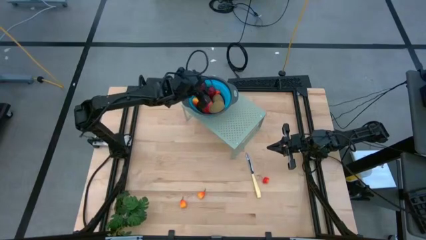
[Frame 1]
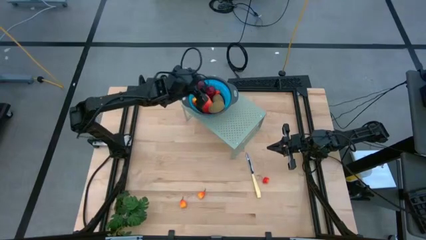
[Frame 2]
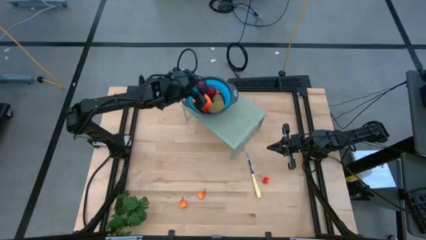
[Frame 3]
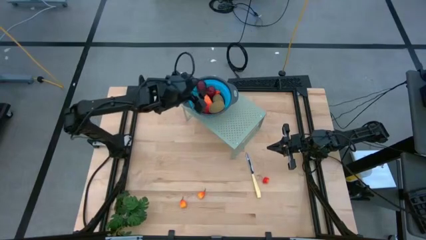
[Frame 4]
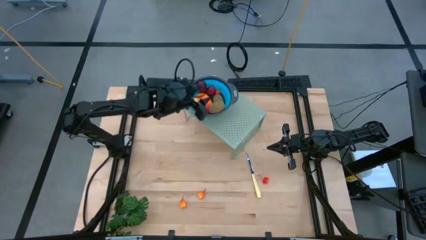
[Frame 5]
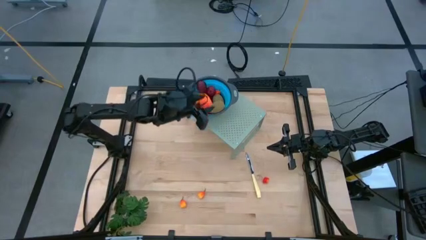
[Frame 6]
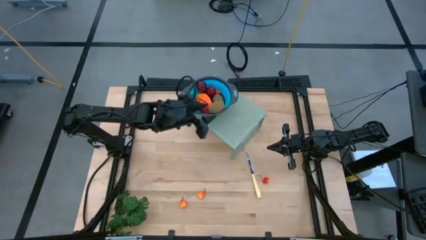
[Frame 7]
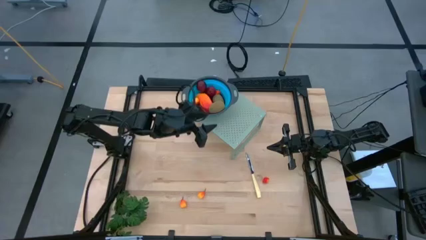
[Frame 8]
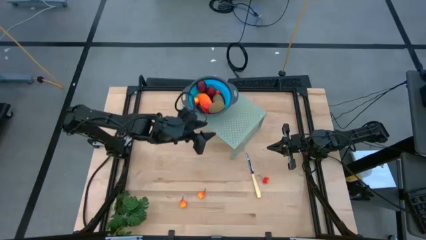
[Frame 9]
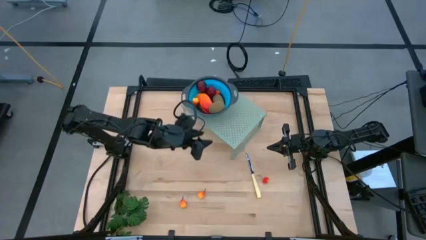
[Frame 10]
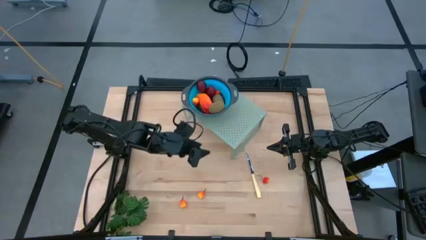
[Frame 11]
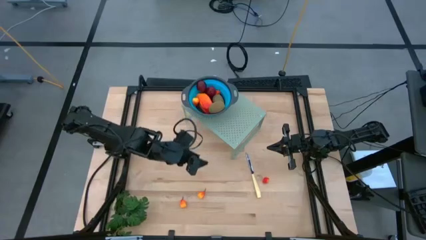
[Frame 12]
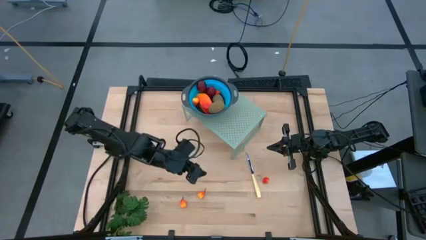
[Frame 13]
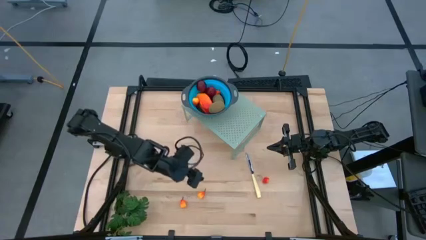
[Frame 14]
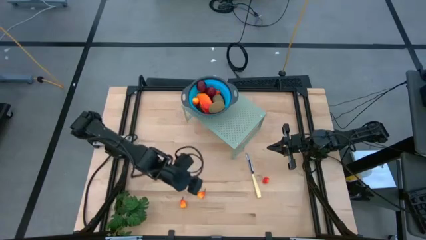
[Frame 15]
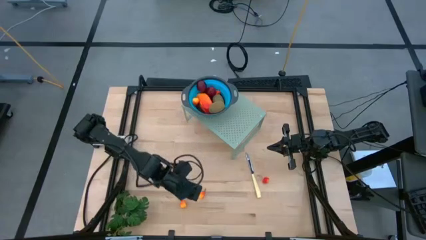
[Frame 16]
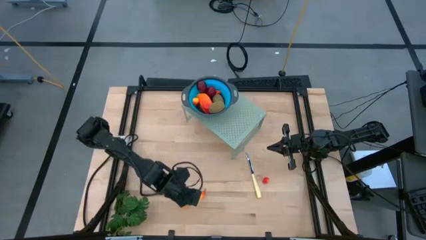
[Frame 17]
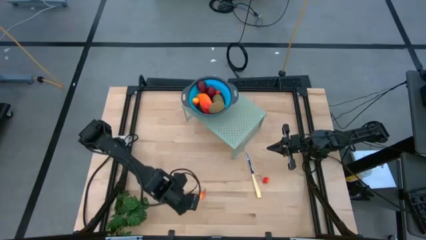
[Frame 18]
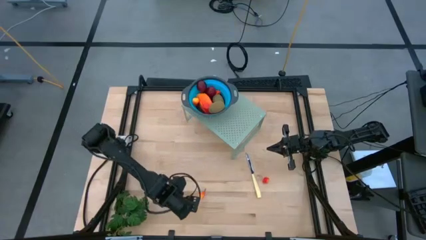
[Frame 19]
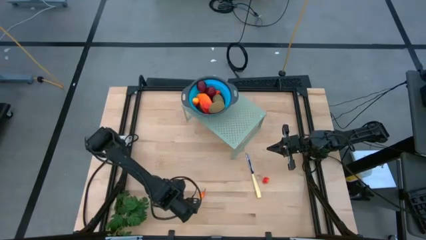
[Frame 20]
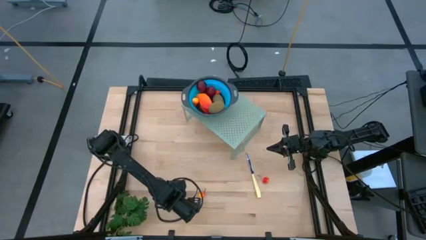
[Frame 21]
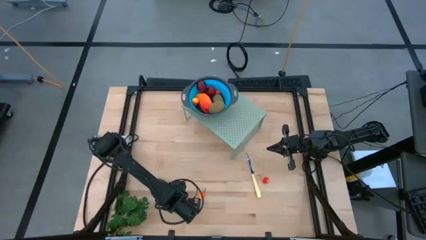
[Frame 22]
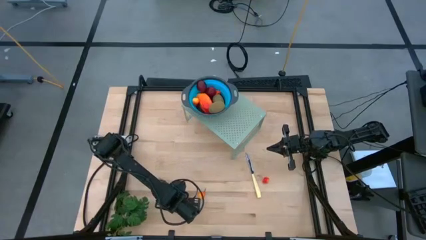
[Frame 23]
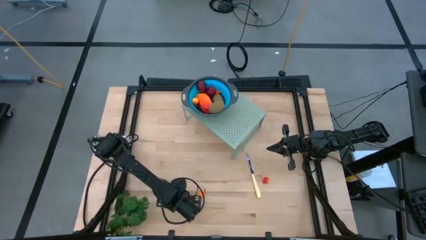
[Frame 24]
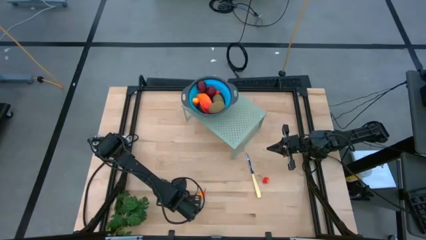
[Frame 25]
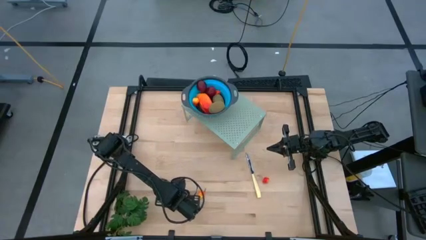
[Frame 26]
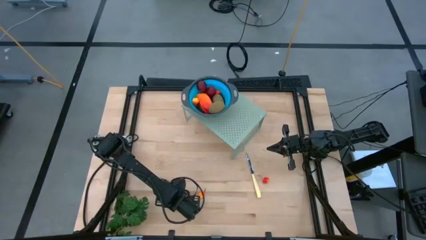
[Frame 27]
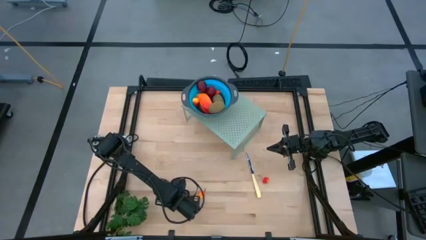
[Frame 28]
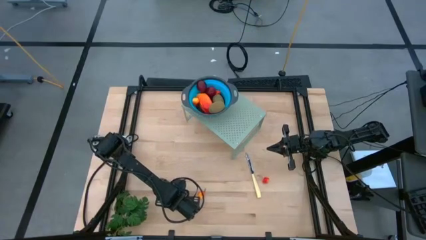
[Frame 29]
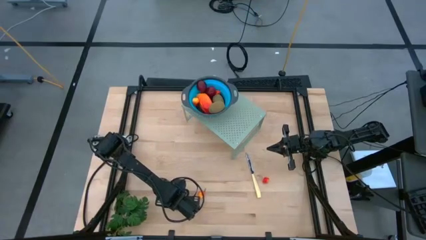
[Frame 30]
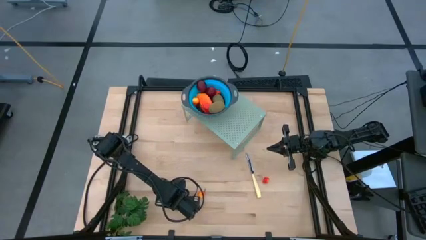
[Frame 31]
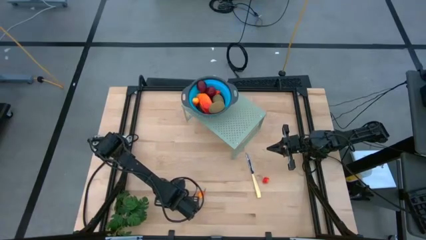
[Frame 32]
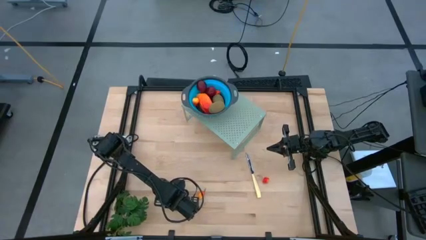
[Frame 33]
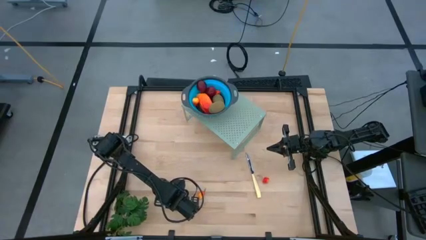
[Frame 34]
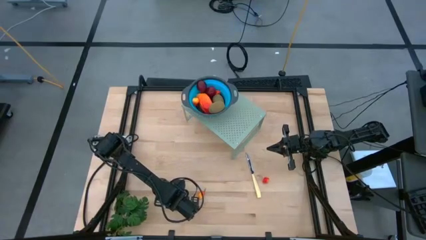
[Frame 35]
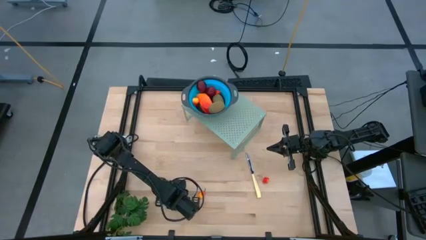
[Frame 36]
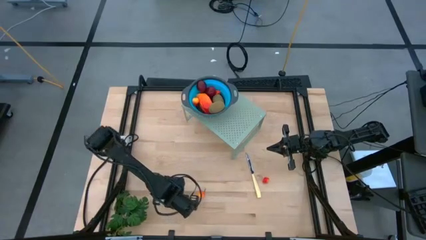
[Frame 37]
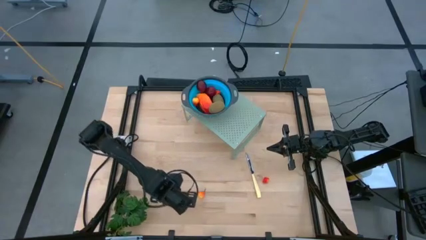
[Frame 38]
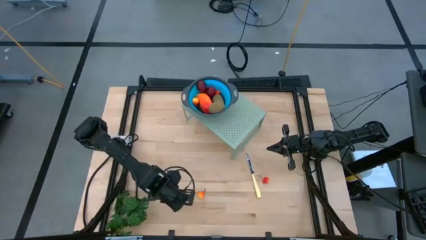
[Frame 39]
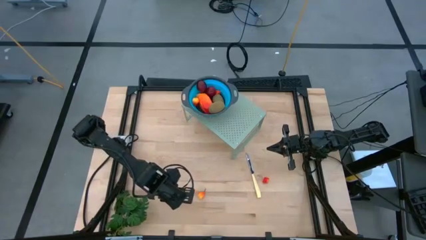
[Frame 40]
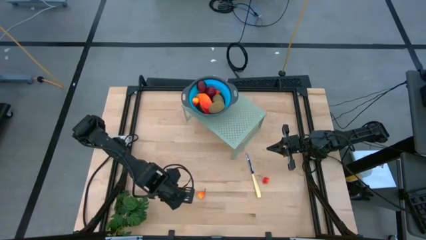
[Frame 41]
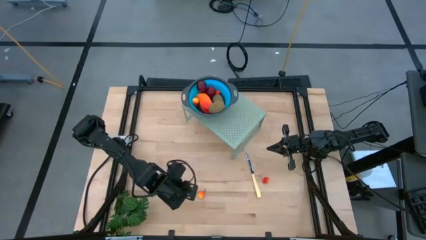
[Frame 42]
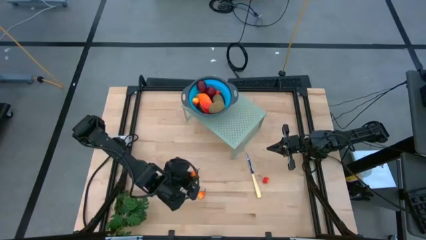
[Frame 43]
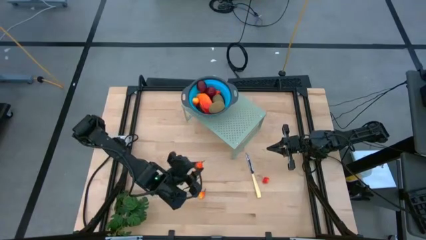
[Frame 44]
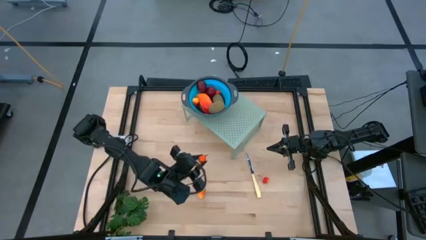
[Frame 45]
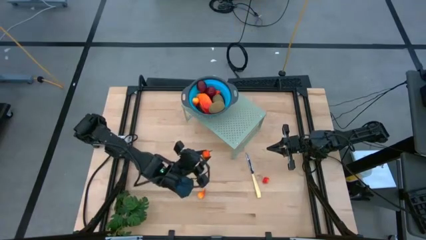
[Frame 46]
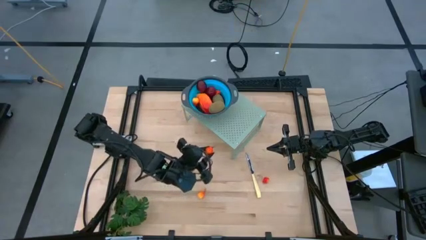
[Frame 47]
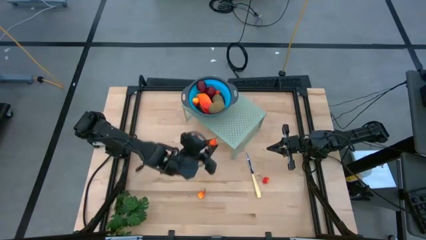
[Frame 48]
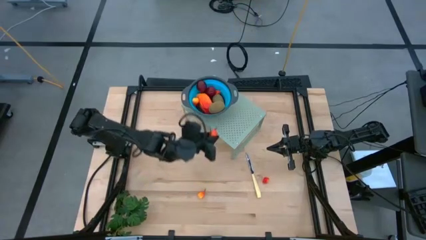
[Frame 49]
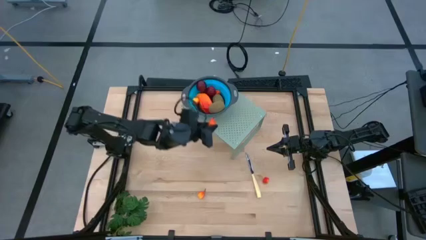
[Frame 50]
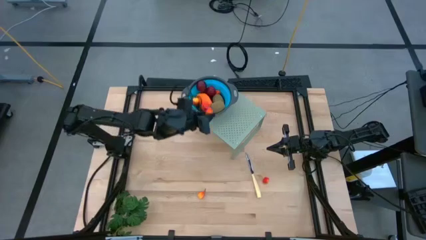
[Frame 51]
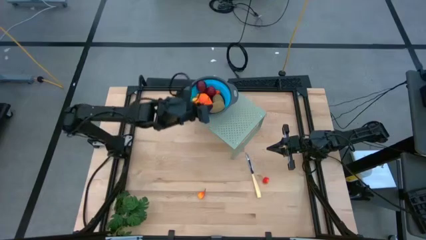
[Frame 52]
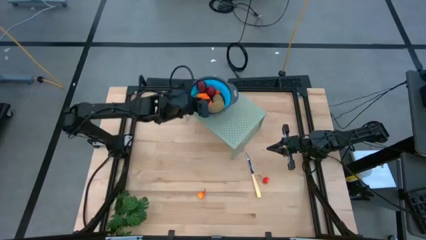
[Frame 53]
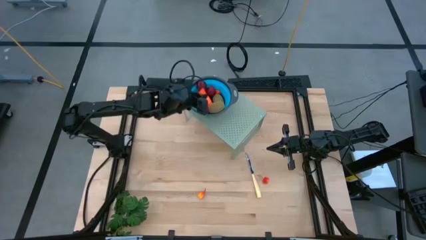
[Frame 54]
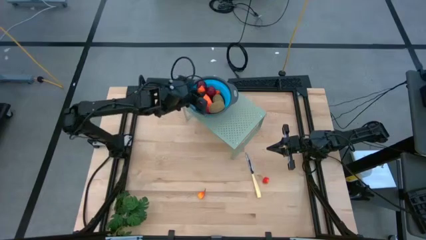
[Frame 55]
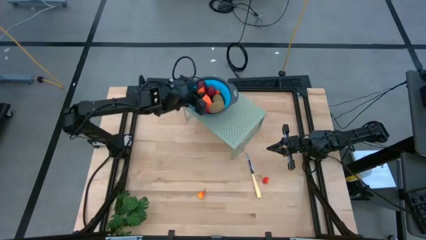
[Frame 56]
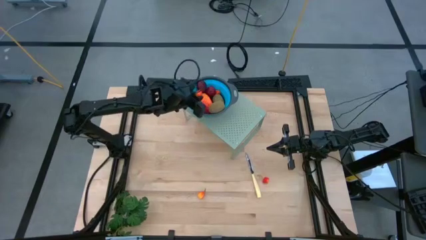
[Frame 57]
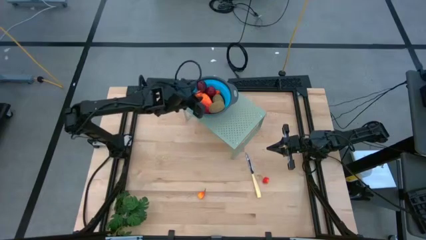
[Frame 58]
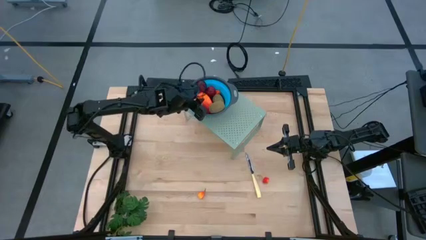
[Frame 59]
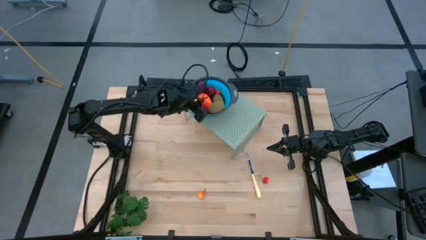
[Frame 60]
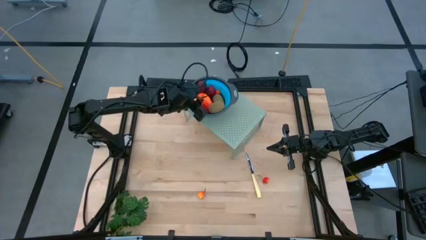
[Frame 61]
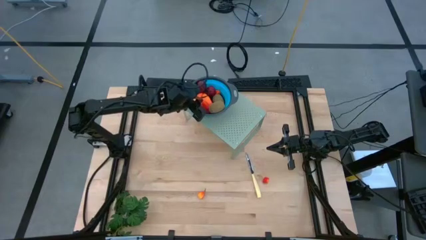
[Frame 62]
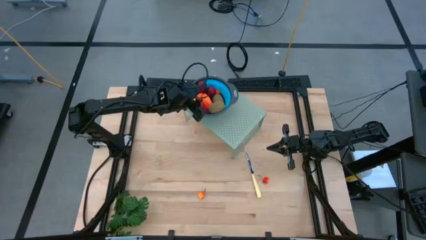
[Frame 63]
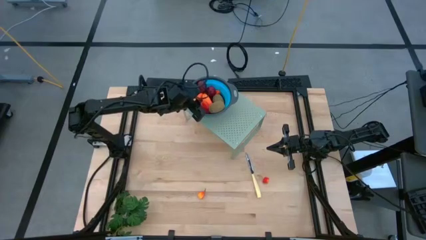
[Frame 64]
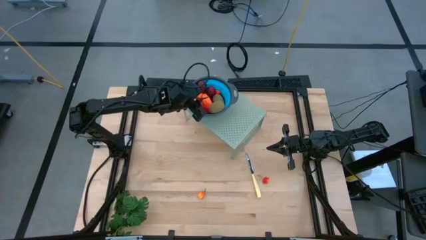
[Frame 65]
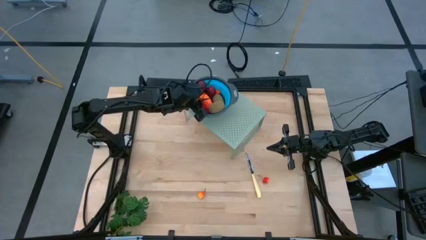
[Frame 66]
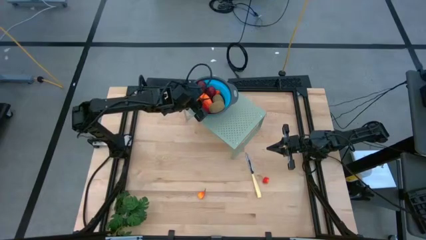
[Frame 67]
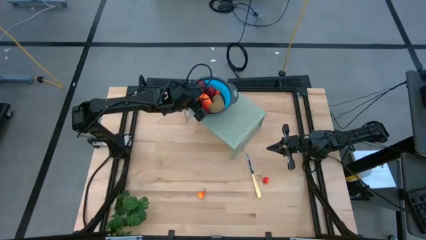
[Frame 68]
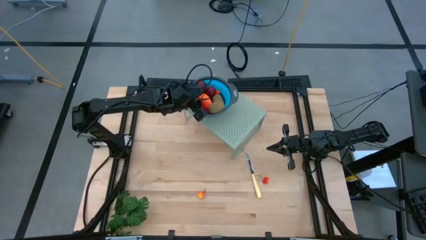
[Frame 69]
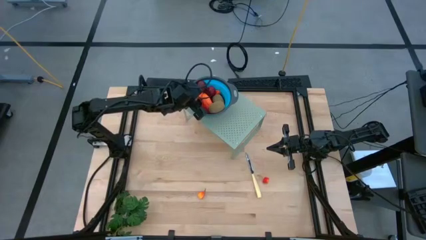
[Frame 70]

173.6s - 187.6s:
Task: Pick & Place Fruit
Put the pear into the blue strainer bowl on the shelf

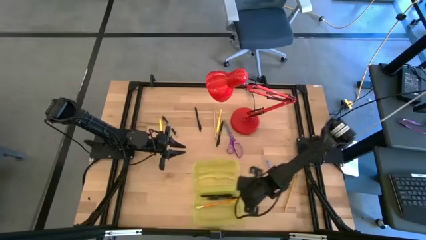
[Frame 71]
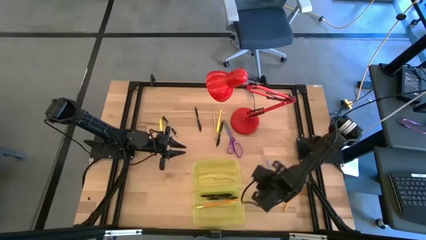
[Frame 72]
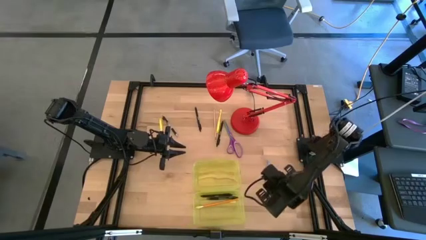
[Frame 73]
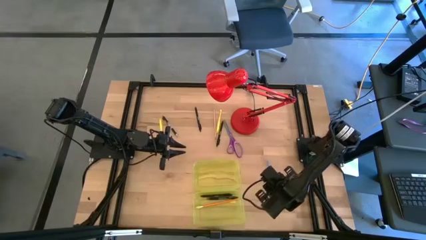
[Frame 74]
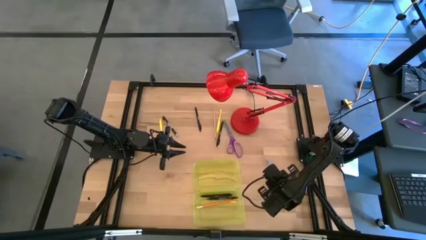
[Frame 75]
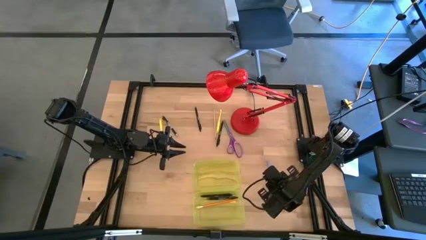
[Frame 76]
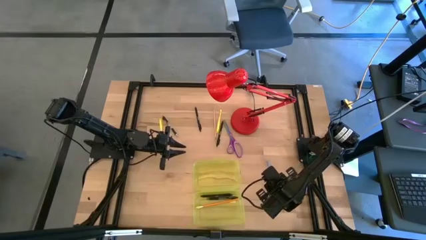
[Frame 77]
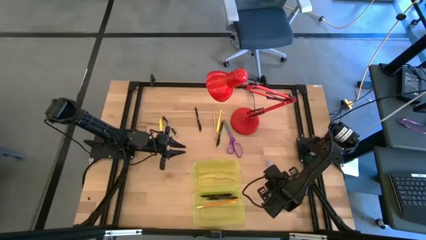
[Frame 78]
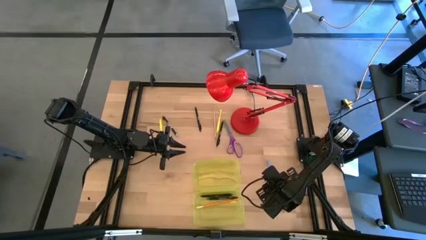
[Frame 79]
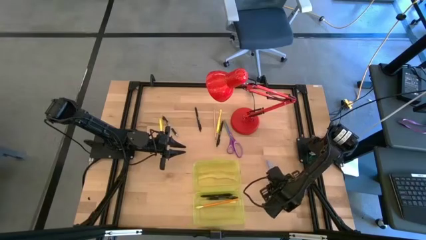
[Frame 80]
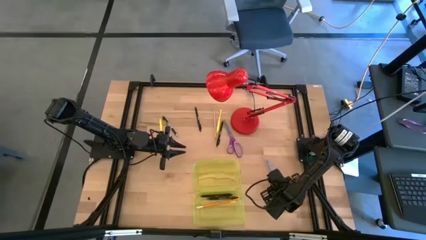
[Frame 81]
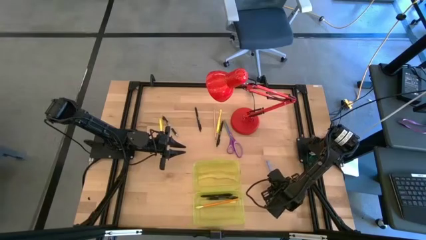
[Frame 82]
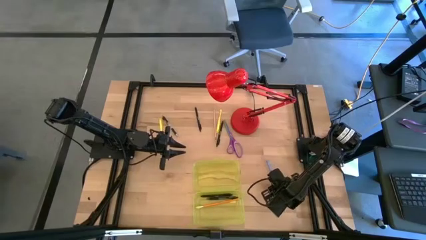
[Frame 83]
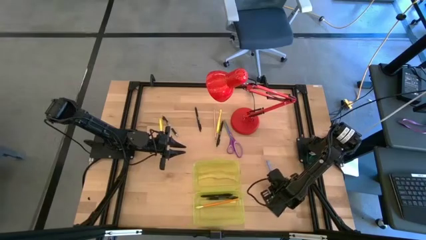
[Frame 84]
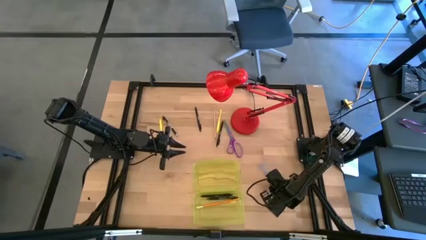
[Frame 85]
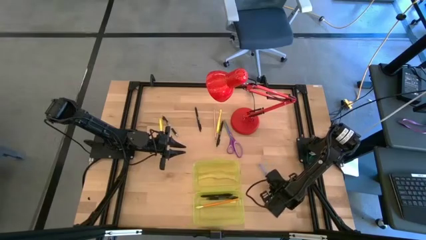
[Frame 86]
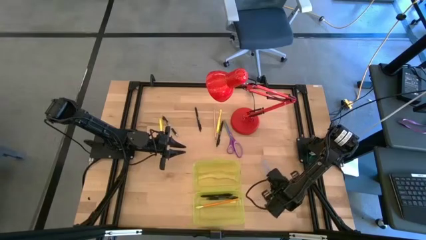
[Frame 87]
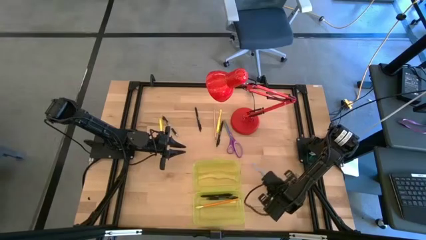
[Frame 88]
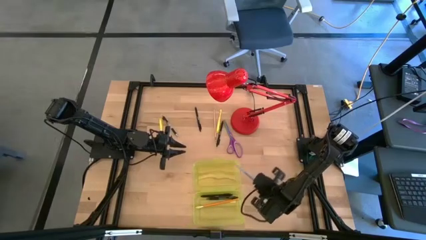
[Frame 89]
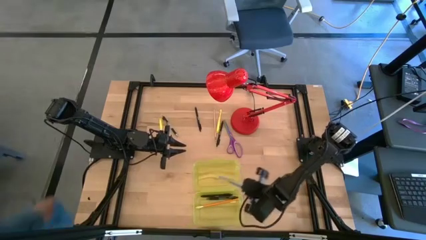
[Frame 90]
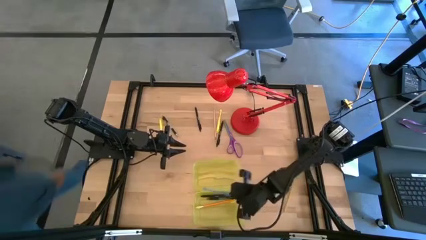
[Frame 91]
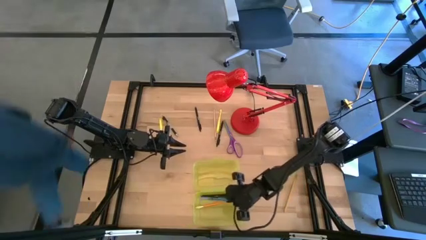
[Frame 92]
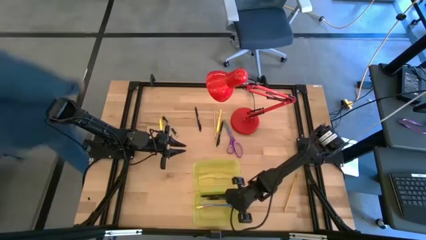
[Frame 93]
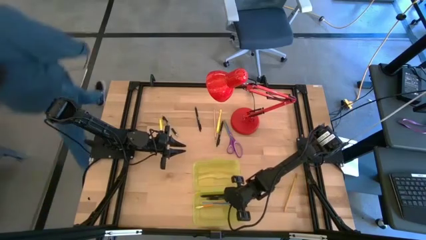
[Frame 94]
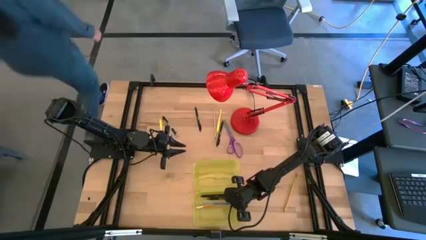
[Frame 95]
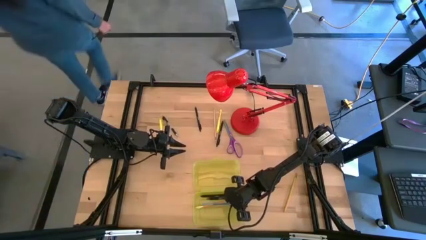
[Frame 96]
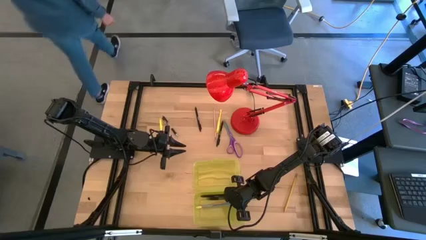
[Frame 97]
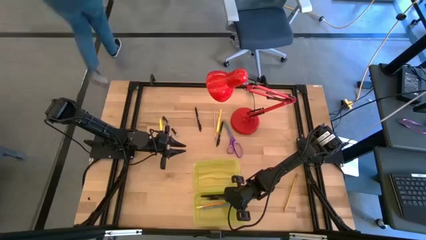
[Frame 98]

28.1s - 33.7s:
Task: Pick & place school supplies into a supply box
Put the blue pen into the yellow supply box
